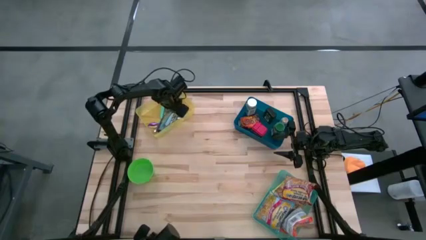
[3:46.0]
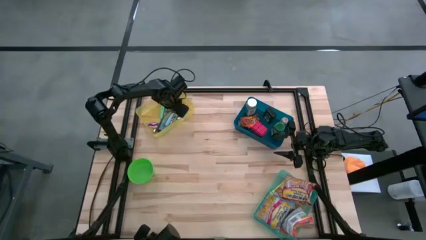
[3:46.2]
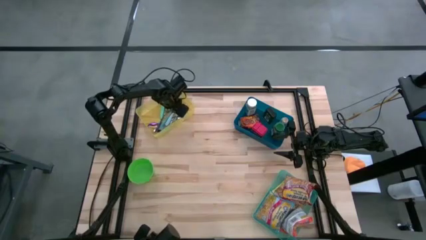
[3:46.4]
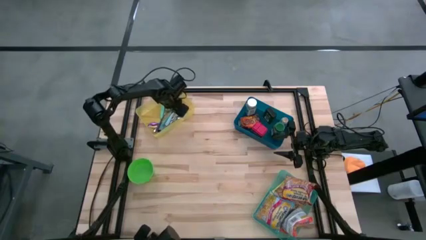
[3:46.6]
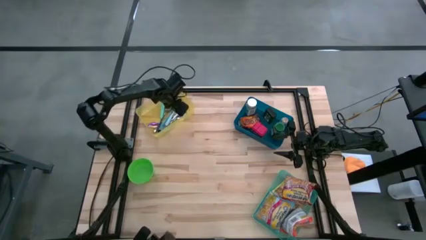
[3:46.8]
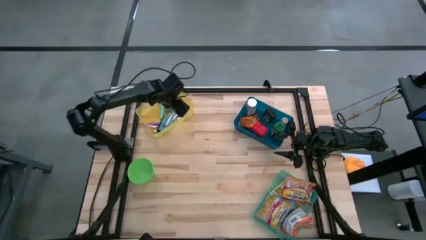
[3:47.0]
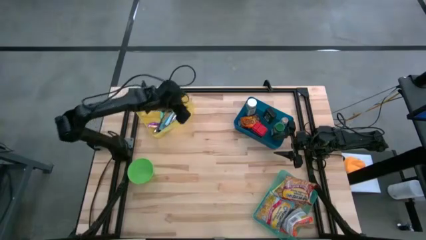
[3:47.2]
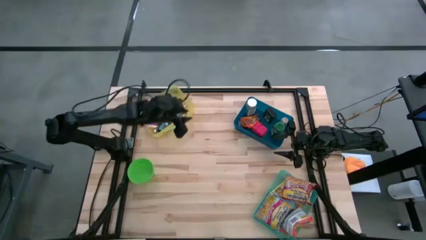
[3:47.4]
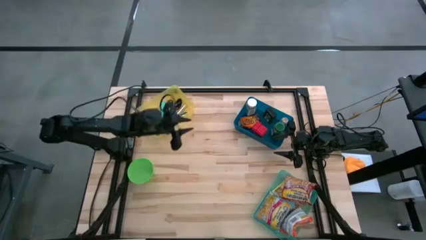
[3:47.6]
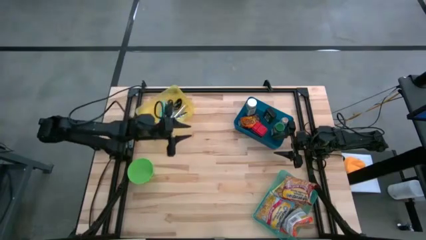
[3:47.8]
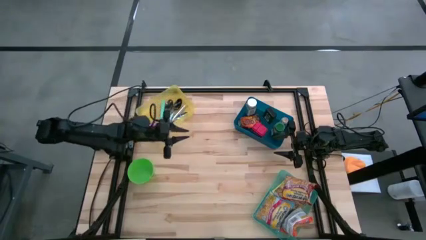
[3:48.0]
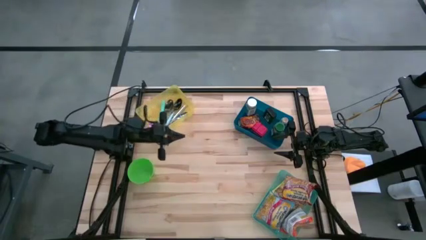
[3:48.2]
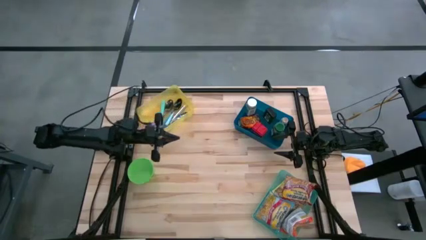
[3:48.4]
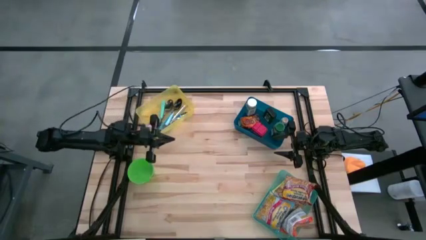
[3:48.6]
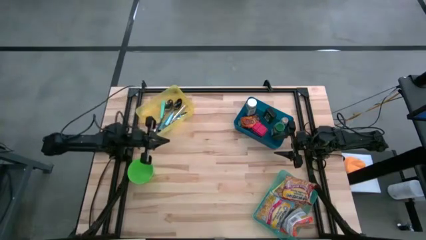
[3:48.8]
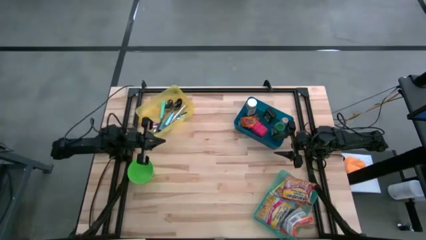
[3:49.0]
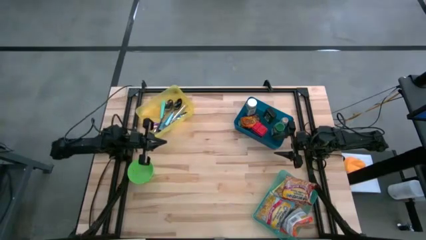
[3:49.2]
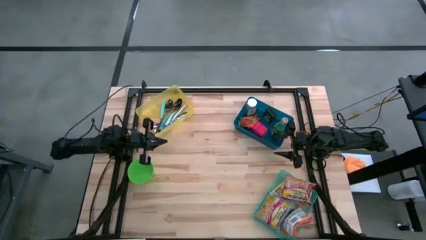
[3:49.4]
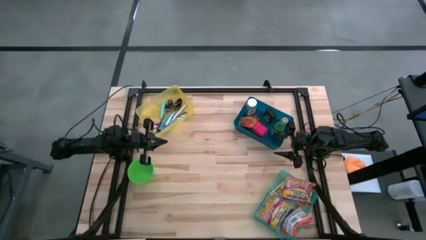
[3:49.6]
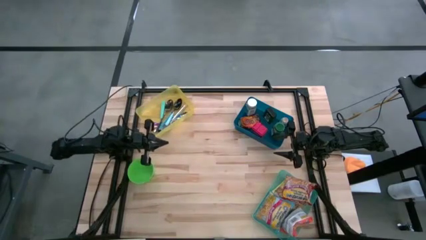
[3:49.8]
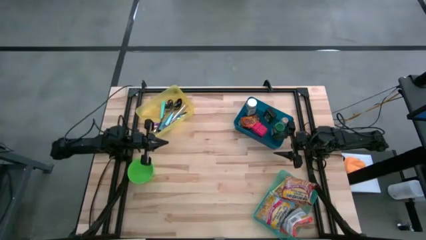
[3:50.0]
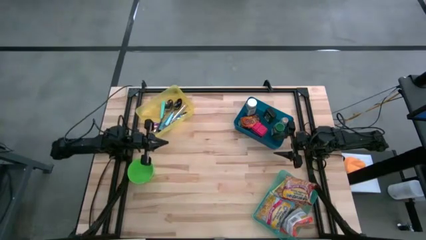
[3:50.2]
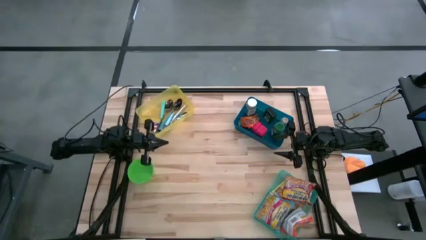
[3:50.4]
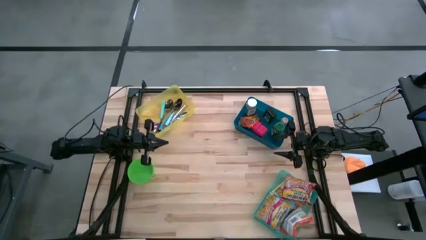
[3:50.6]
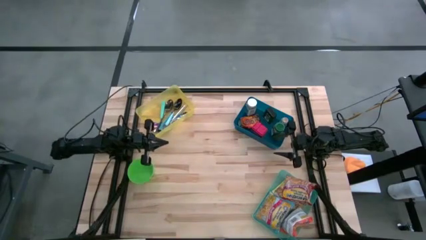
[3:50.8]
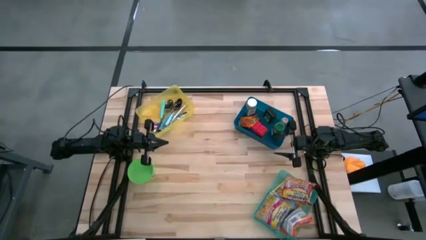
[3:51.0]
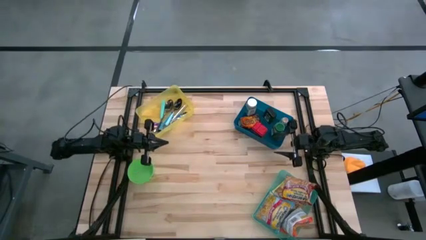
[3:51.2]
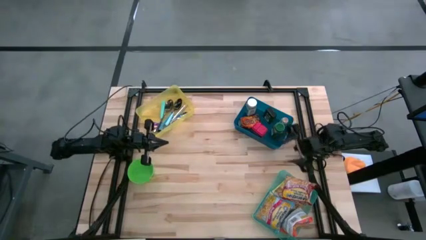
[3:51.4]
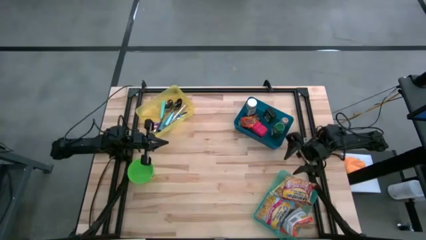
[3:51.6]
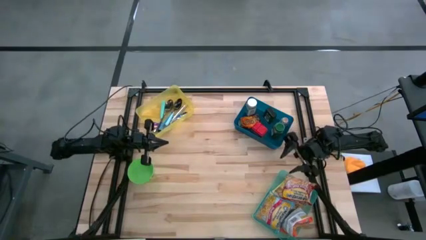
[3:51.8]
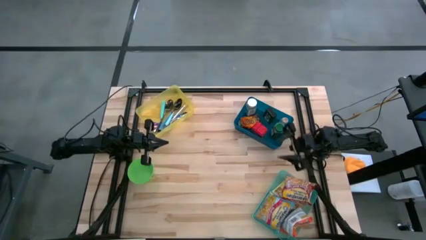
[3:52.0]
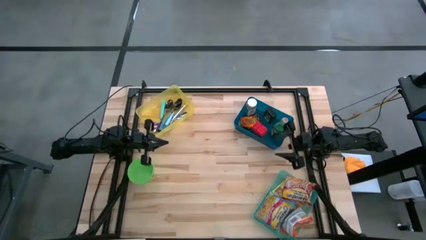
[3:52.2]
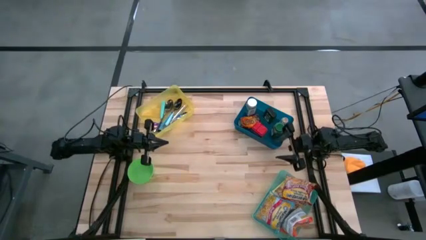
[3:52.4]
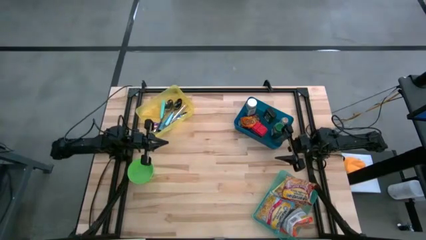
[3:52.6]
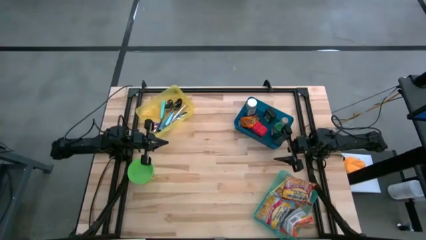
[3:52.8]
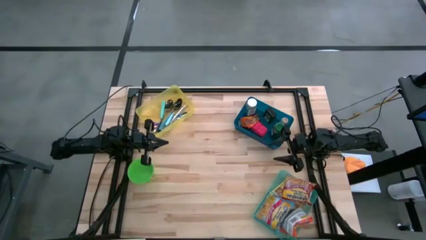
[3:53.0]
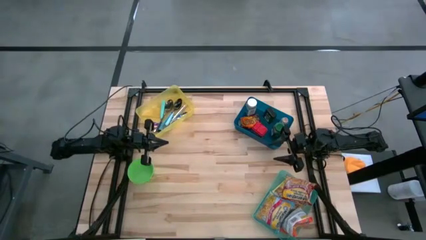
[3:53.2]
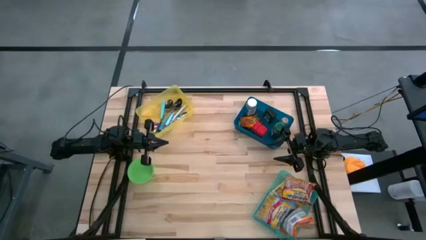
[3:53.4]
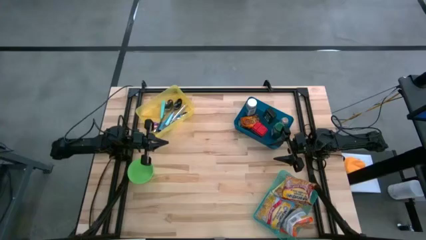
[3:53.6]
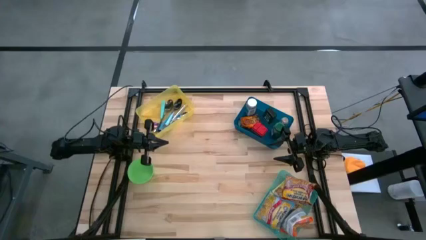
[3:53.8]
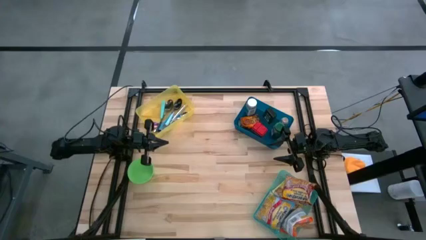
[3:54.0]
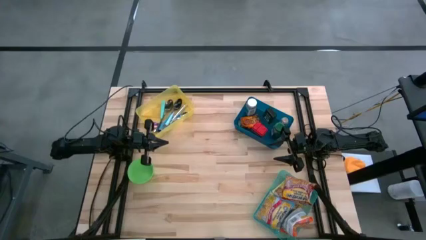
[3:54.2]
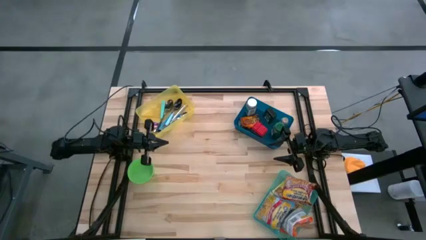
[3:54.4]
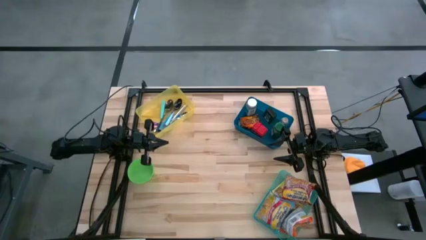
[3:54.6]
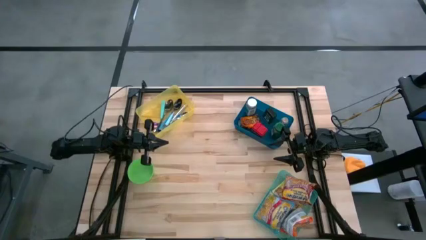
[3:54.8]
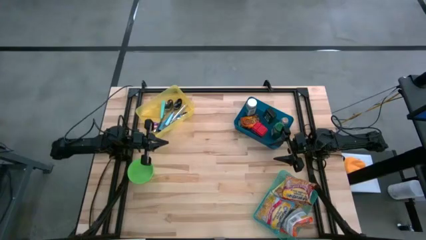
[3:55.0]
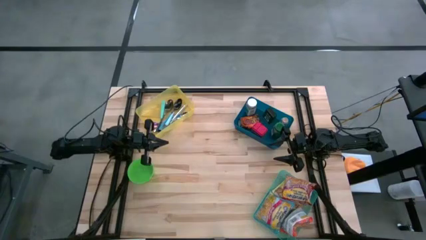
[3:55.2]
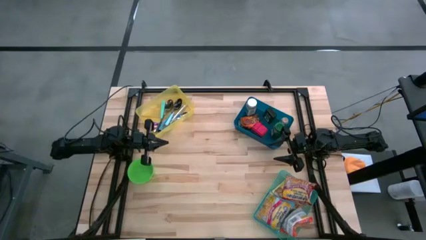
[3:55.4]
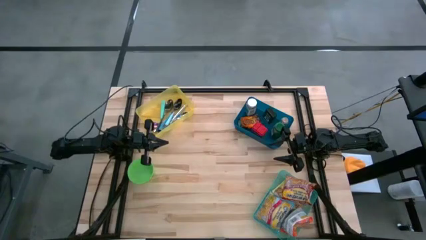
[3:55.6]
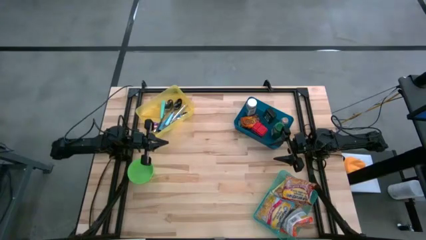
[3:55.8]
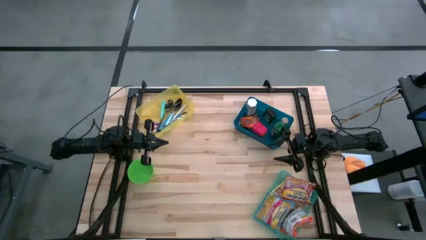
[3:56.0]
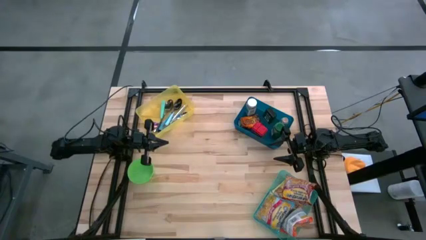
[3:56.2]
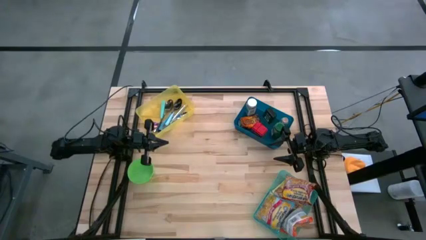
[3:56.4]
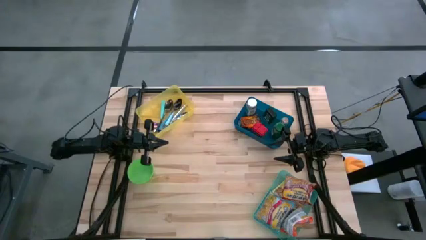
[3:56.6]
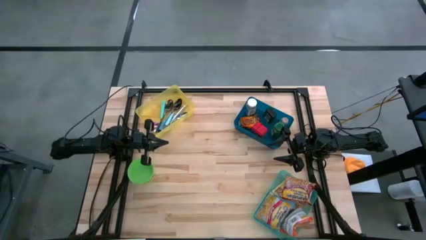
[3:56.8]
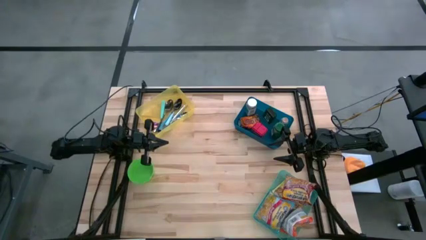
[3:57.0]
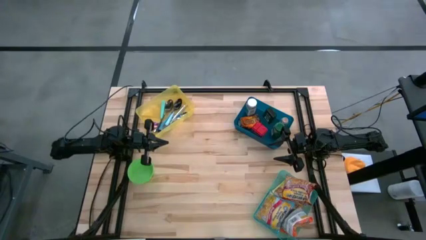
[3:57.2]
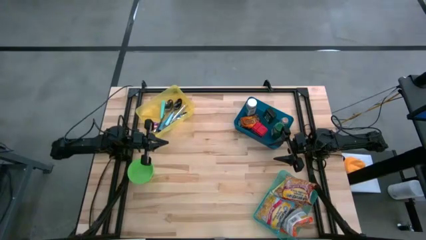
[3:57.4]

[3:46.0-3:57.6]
Return to Home Position
